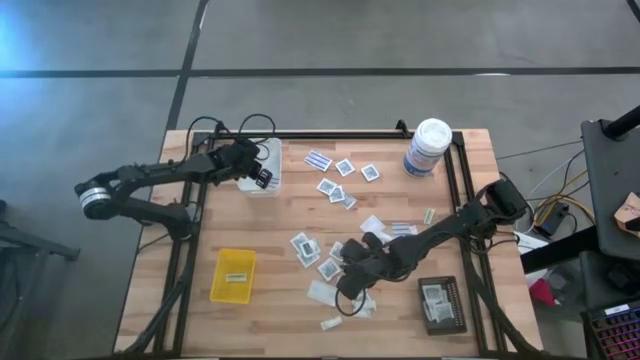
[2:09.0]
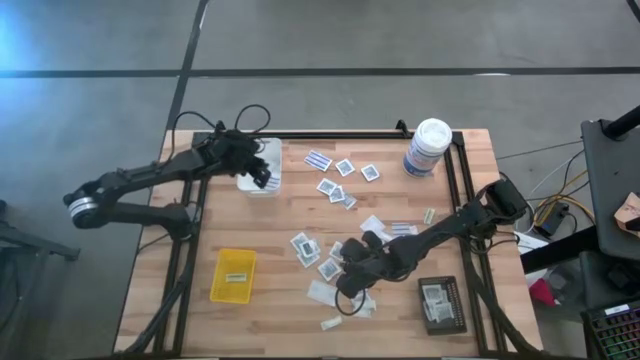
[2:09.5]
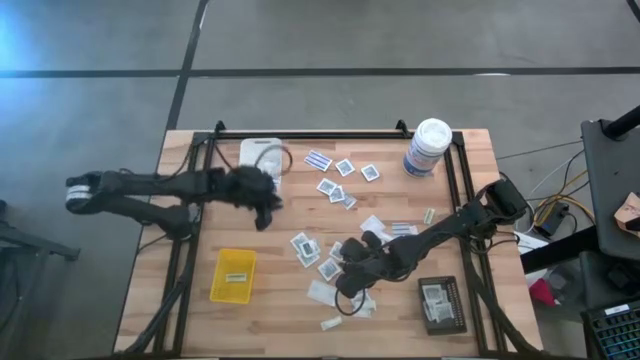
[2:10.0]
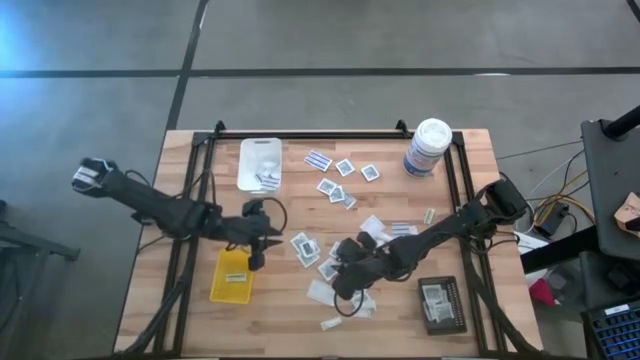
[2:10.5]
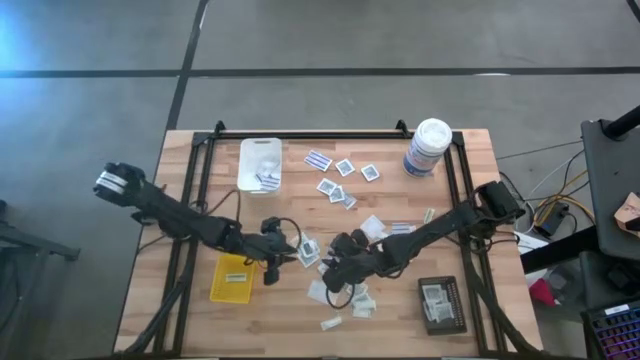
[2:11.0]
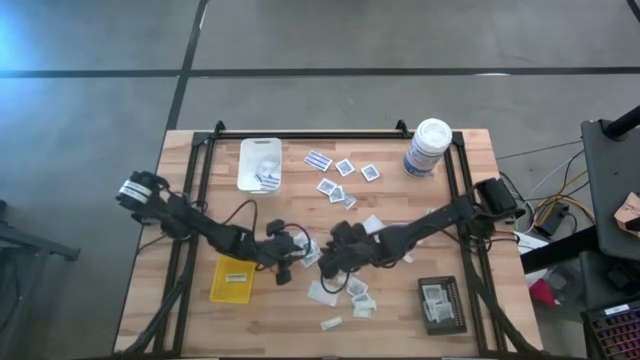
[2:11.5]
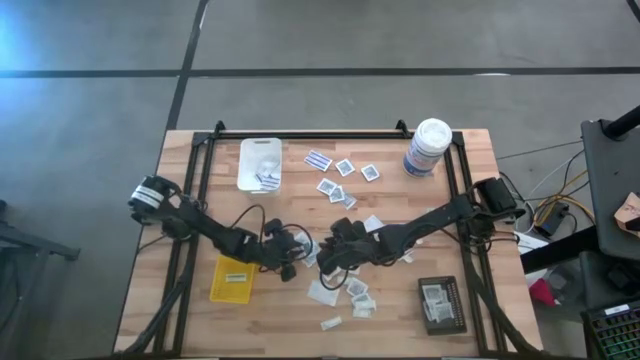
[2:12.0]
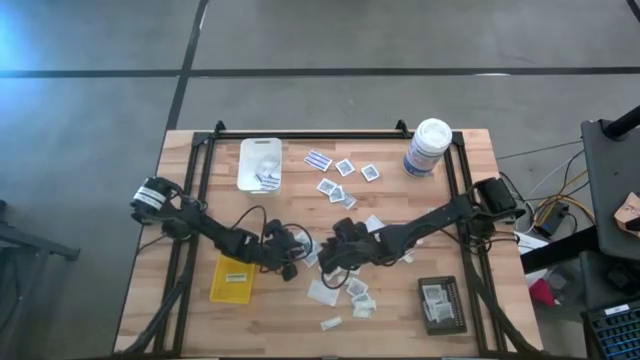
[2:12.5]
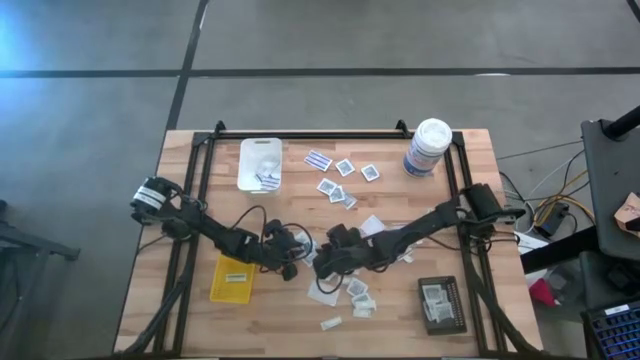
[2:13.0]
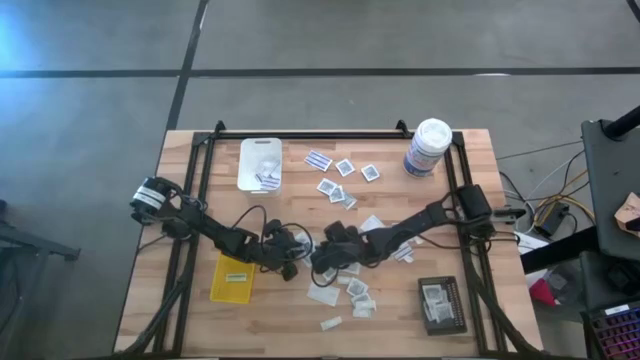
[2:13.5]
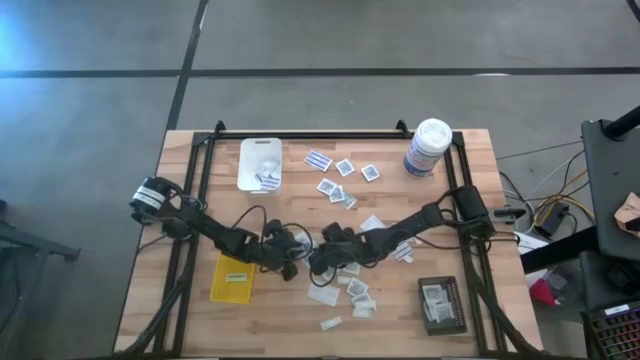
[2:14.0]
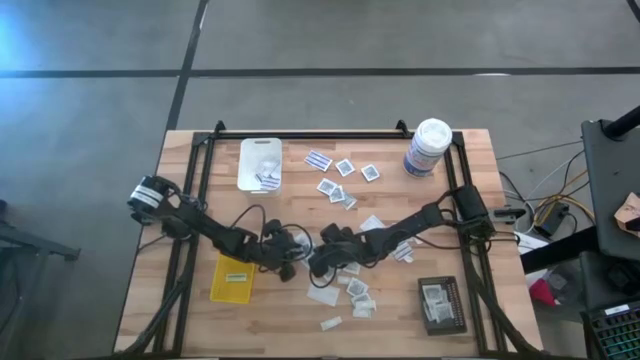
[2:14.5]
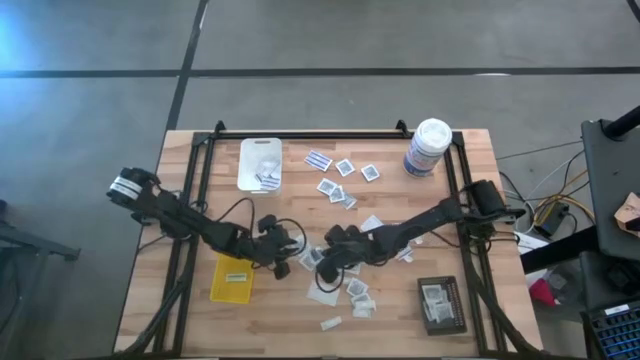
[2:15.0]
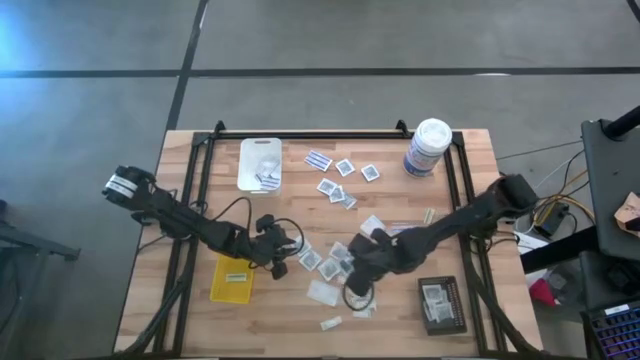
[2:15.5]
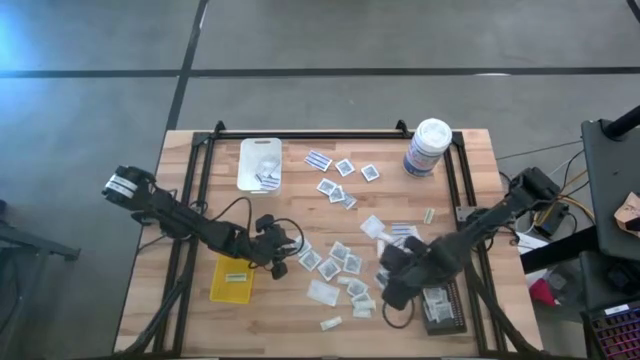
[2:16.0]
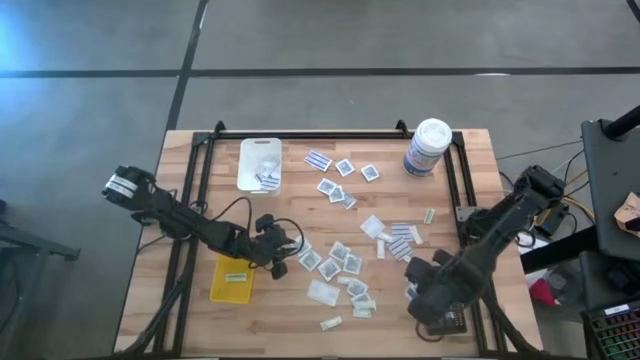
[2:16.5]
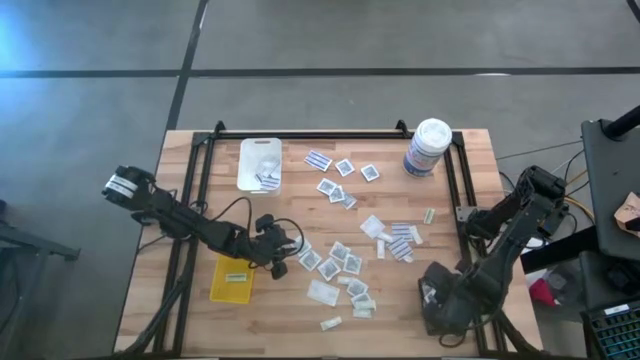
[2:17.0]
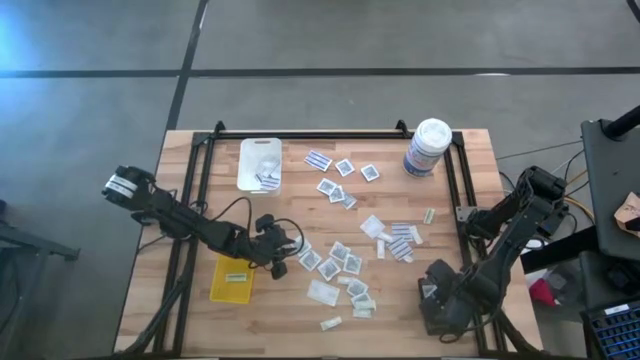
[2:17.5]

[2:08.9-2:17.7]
Task: Pick & Place First Aid Supplies
Put the towelette pack into the black bin

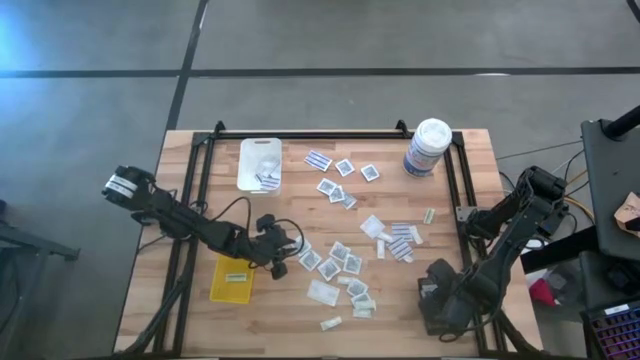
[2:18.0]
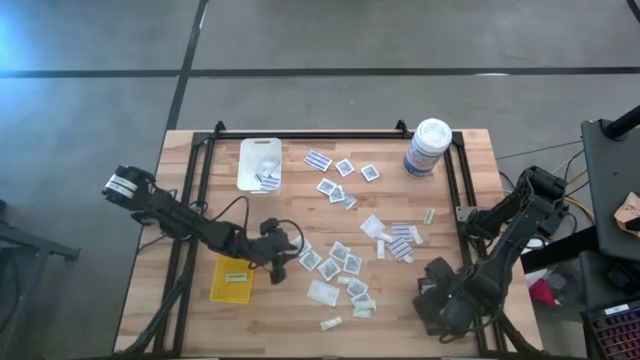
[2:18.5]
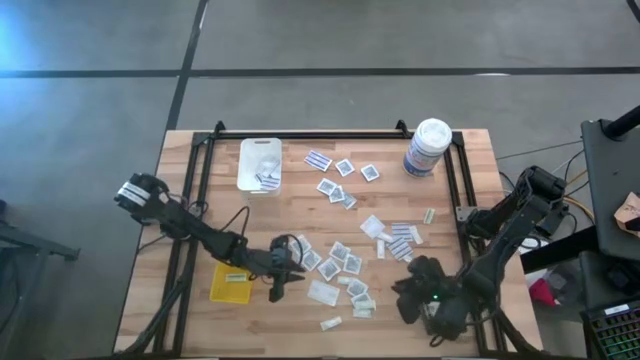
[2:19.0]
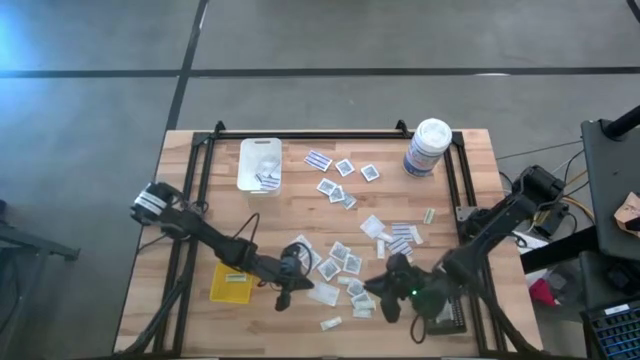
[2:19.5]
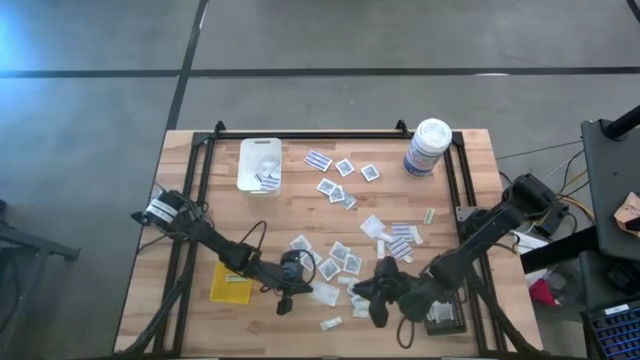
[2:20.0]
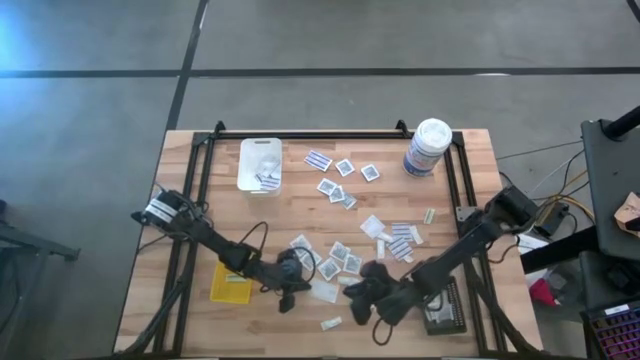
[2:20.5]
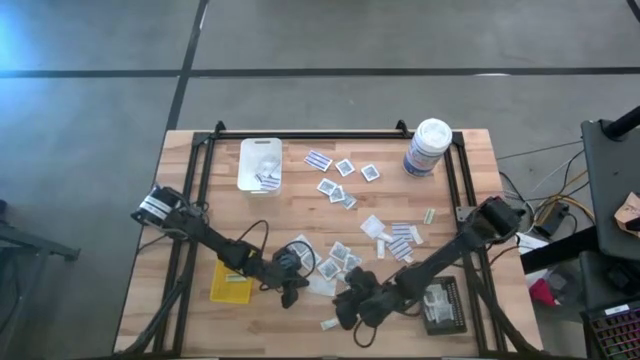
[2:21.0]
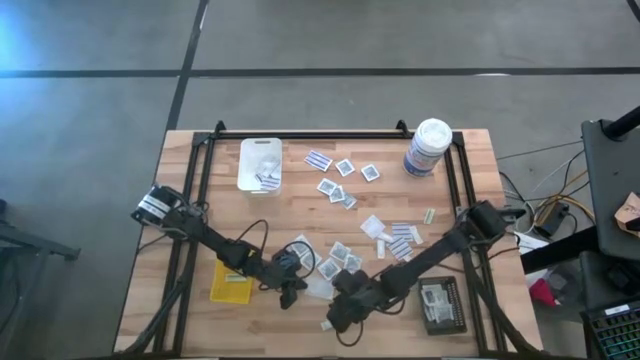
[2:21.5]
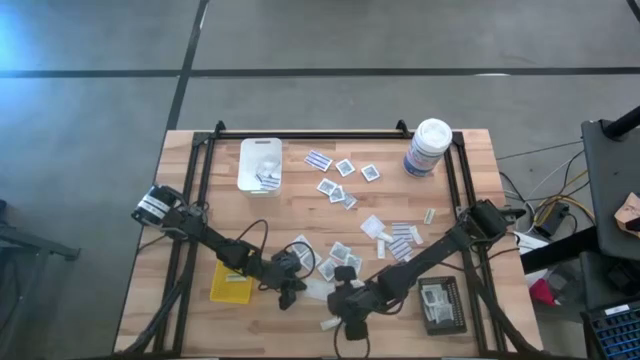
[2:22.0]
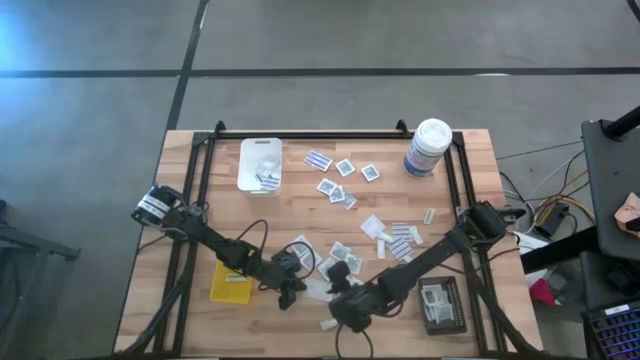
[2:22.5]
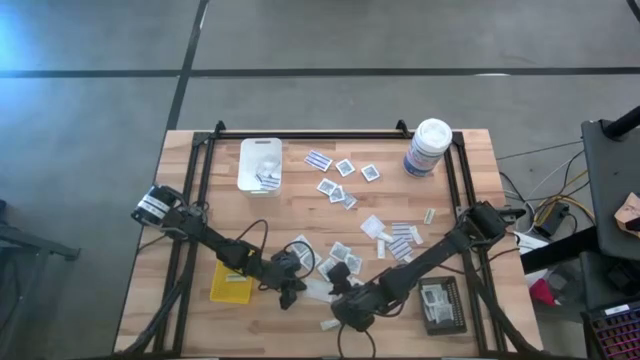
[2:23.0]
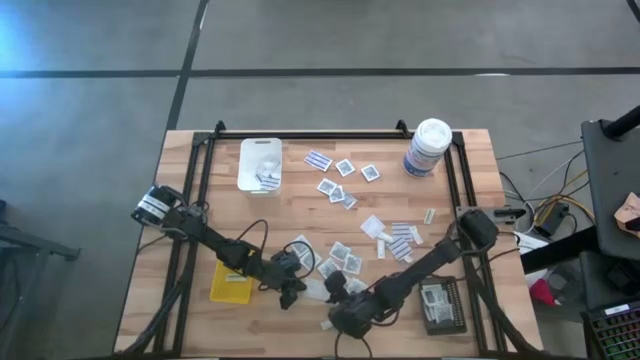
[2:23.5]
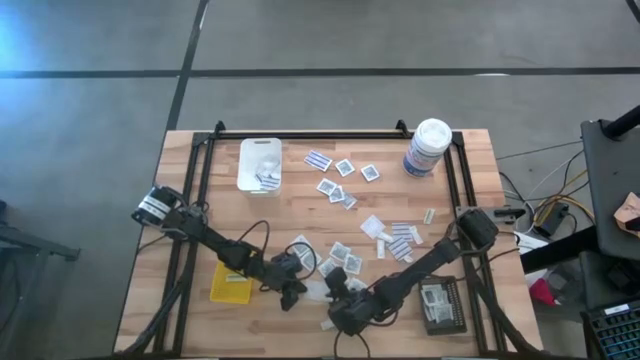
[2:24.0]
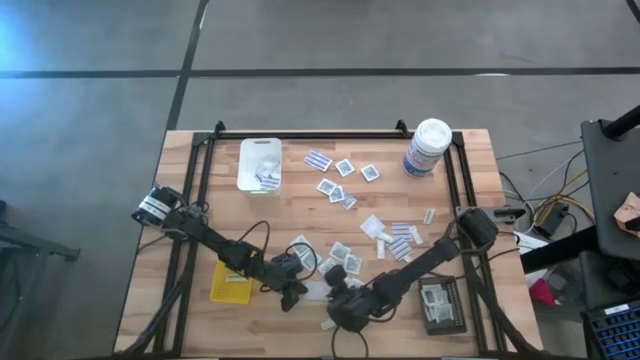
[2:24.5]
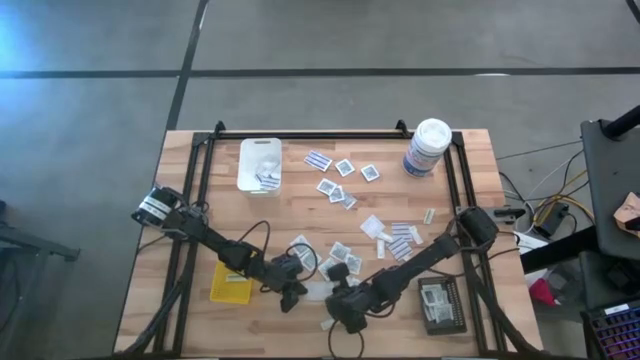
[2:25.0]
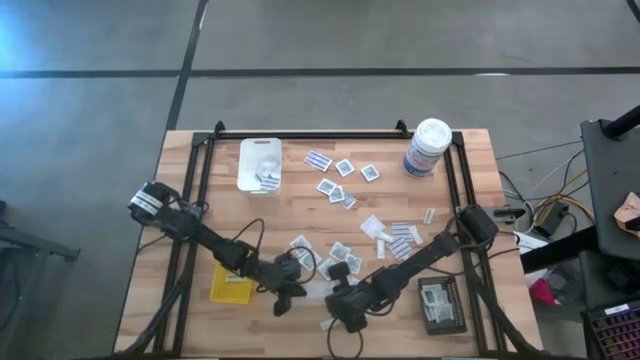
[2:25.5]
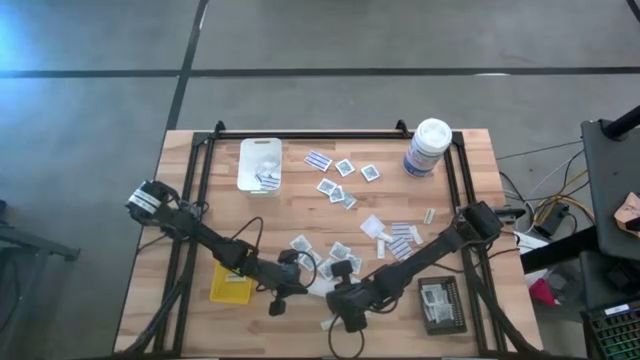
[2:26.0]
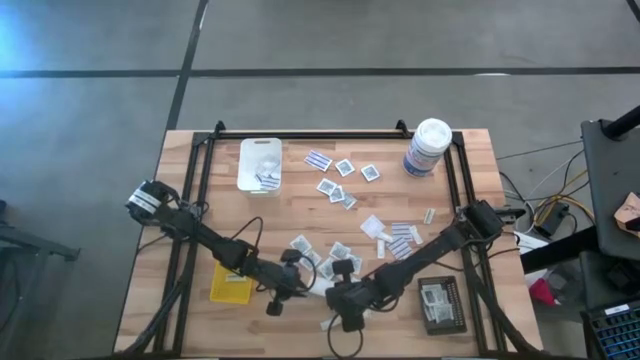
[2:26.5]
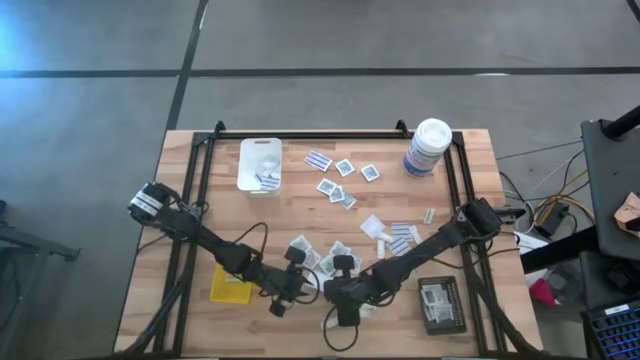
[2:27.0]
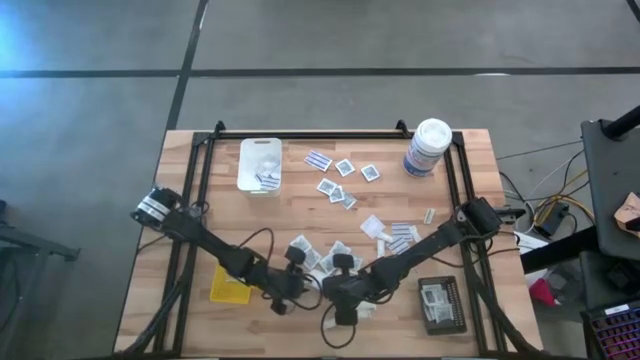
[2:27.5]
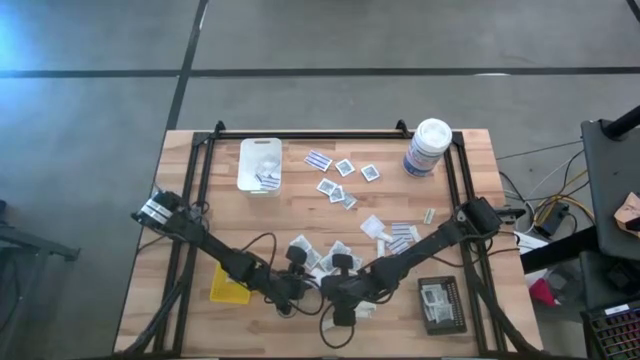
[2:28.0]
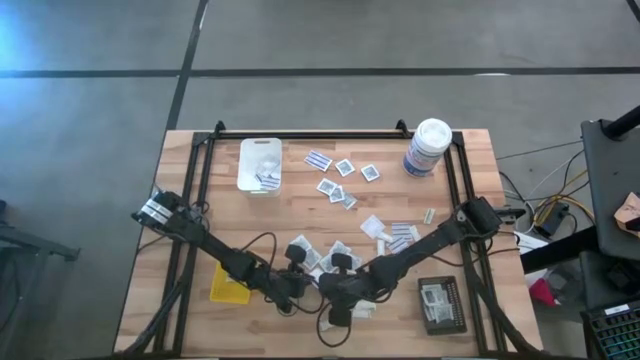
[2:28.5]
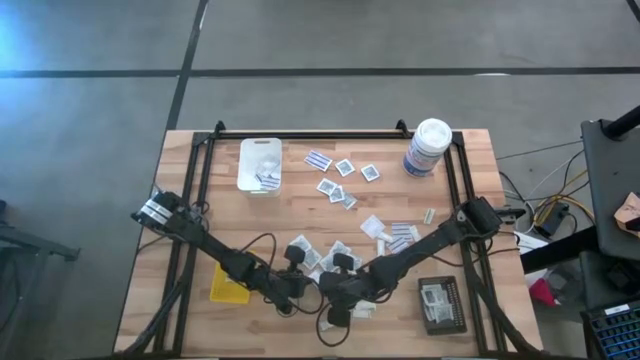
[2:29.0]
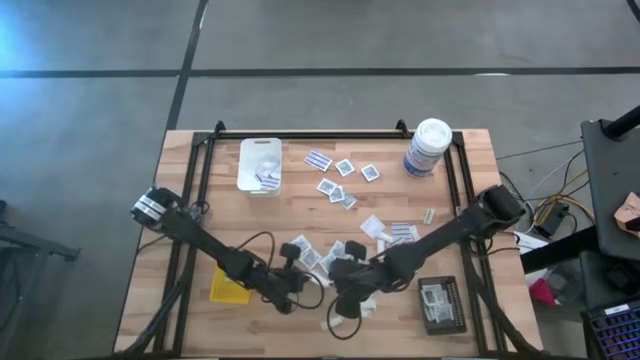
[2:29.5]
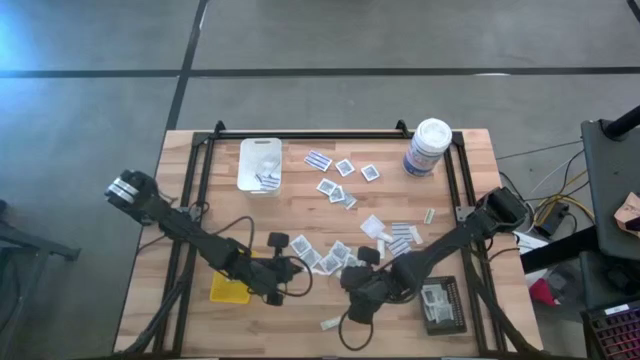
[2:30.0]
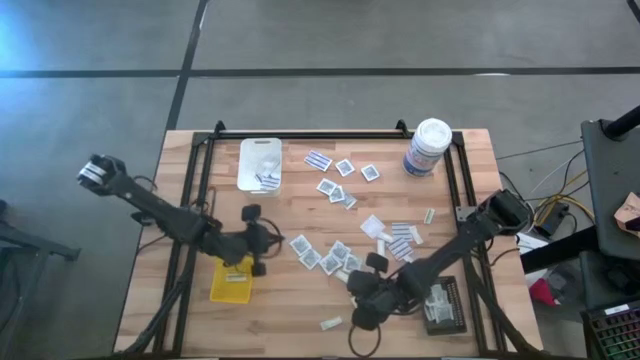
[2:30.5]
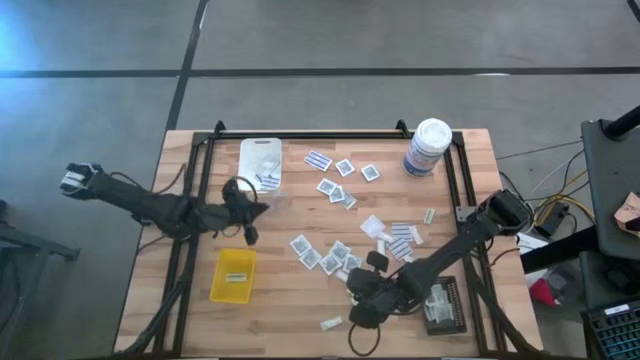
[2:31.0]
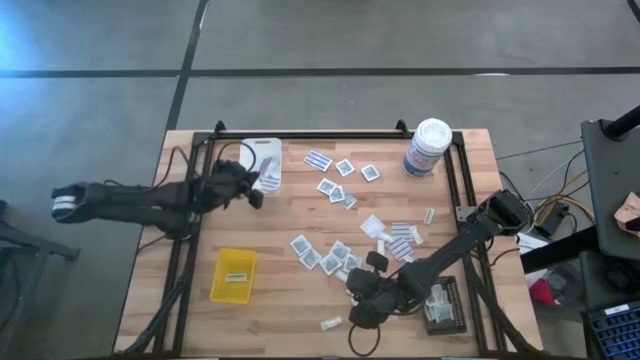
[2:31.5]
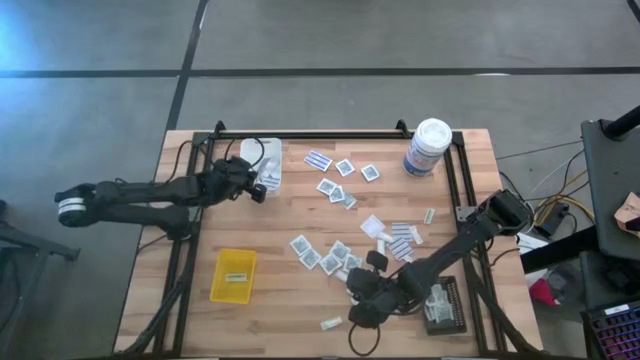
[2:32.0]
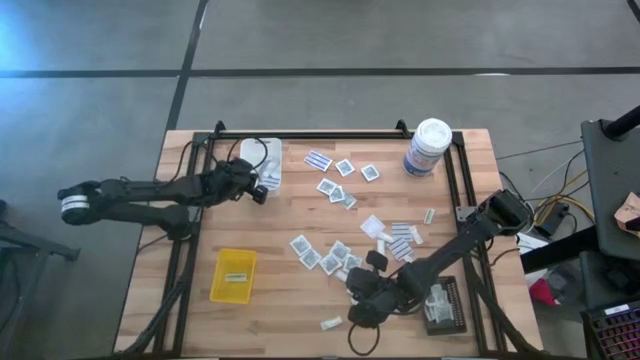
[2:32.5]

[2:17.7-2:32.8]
Put the blue bandage into the white bin
